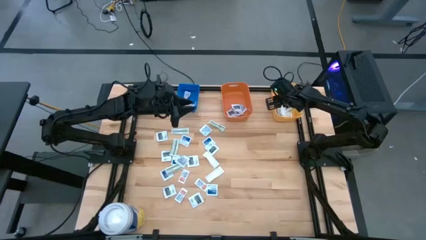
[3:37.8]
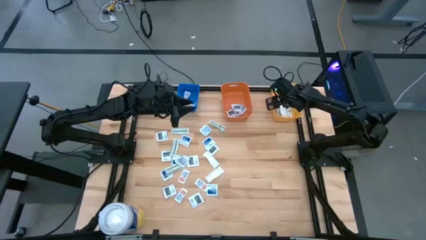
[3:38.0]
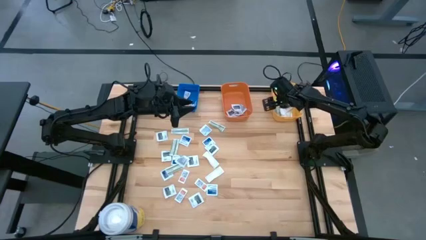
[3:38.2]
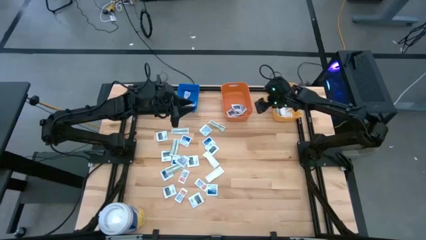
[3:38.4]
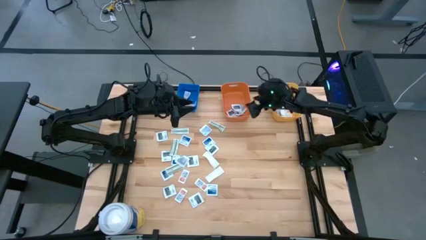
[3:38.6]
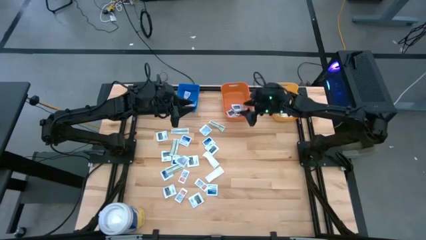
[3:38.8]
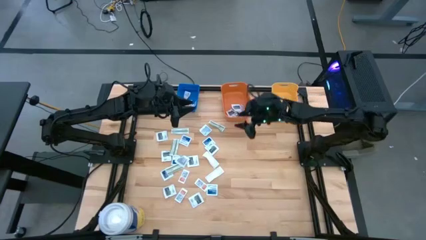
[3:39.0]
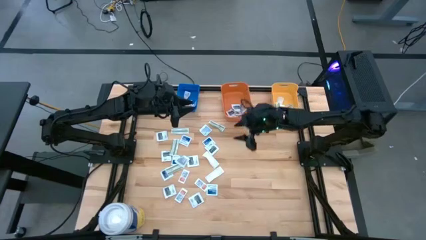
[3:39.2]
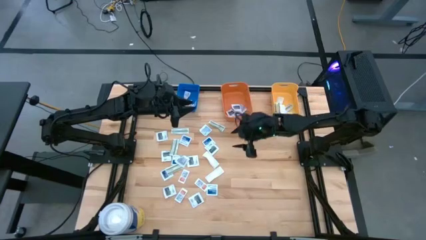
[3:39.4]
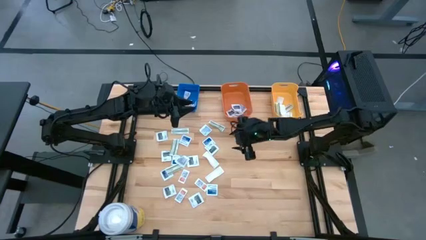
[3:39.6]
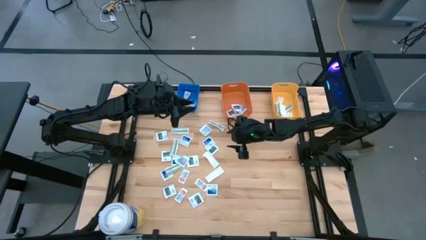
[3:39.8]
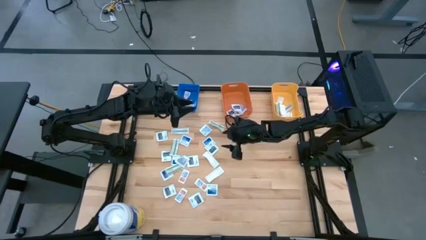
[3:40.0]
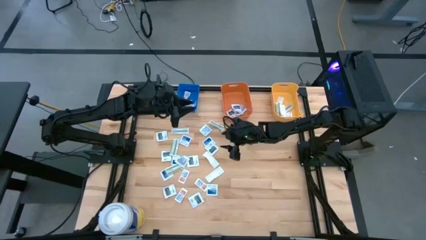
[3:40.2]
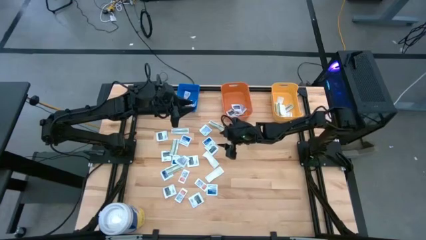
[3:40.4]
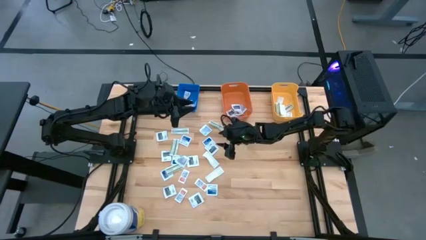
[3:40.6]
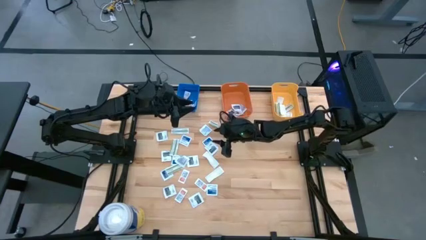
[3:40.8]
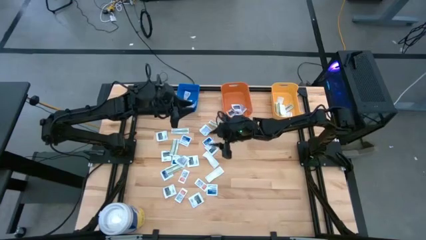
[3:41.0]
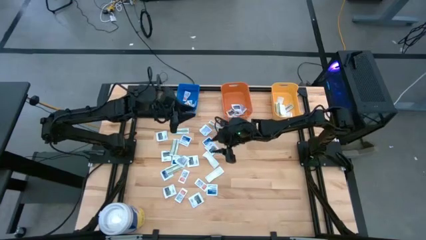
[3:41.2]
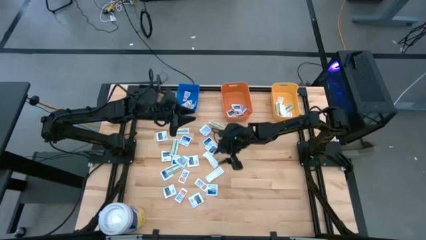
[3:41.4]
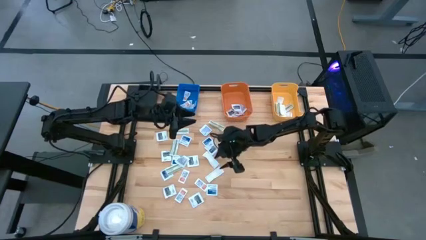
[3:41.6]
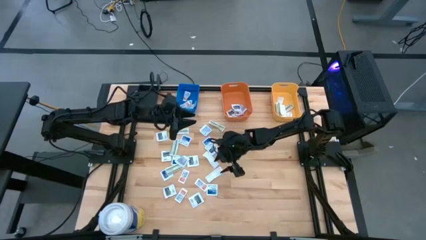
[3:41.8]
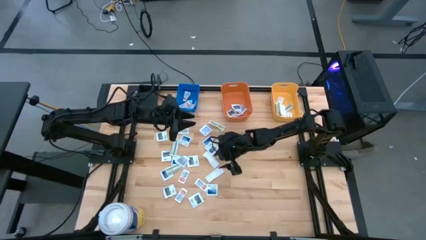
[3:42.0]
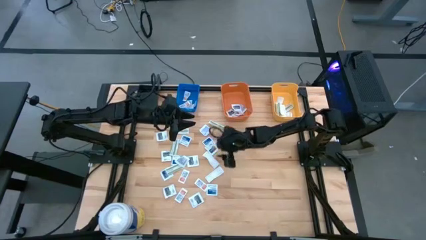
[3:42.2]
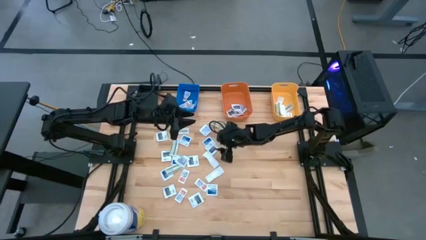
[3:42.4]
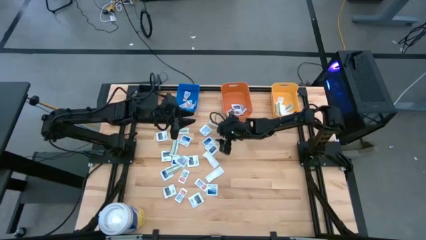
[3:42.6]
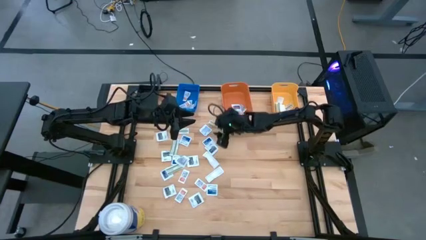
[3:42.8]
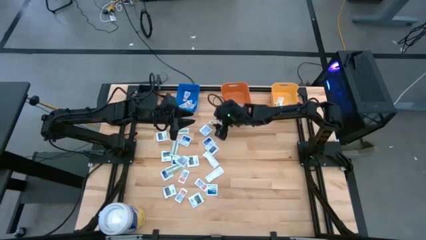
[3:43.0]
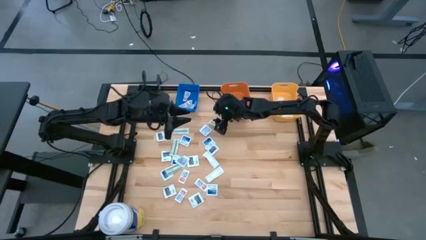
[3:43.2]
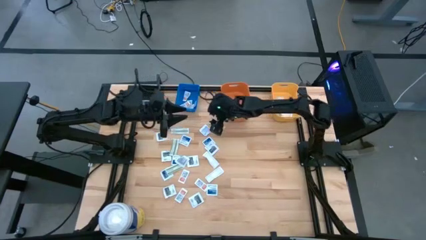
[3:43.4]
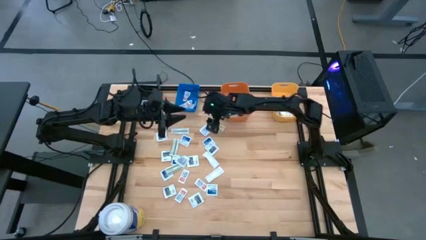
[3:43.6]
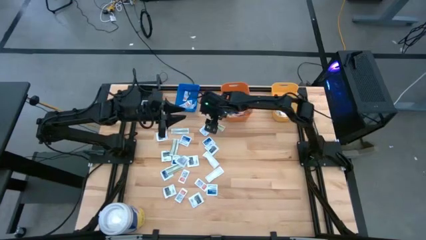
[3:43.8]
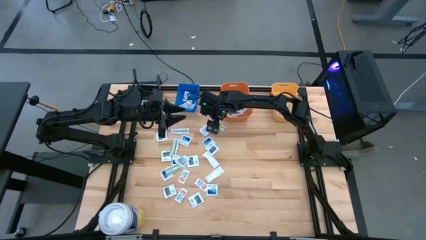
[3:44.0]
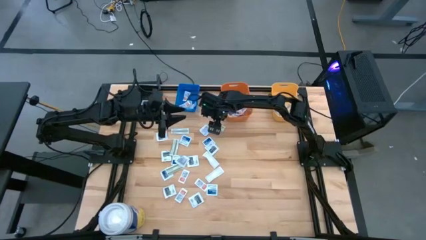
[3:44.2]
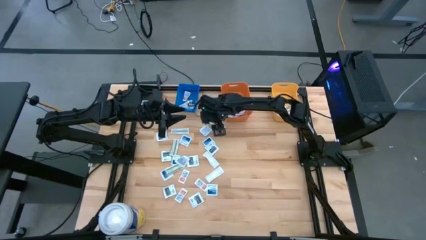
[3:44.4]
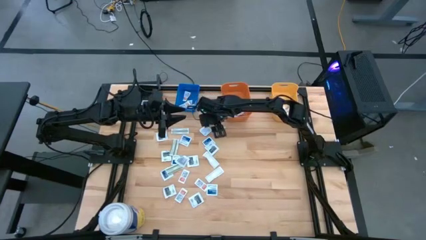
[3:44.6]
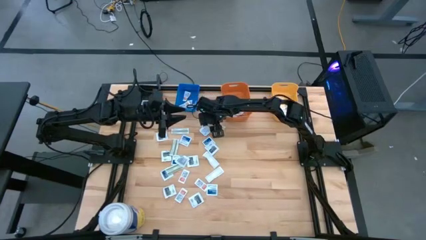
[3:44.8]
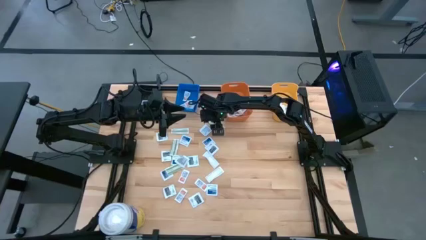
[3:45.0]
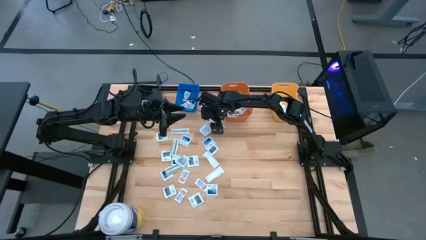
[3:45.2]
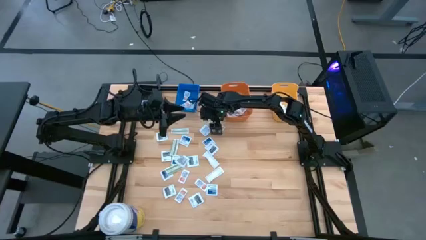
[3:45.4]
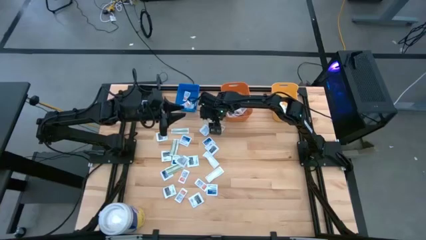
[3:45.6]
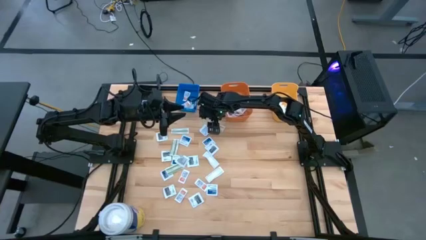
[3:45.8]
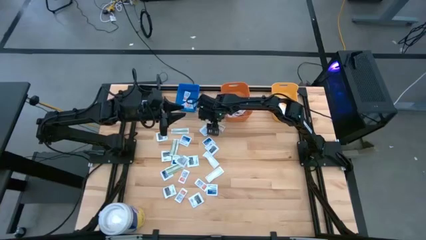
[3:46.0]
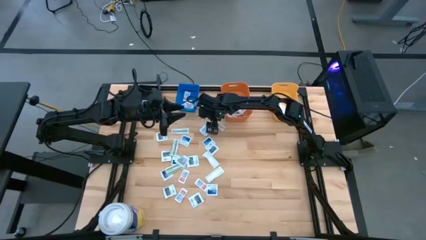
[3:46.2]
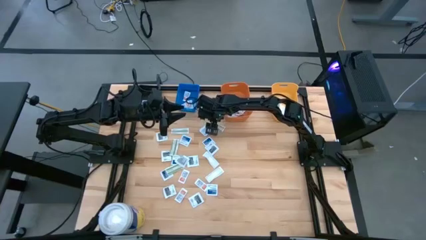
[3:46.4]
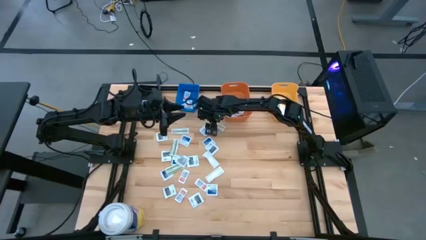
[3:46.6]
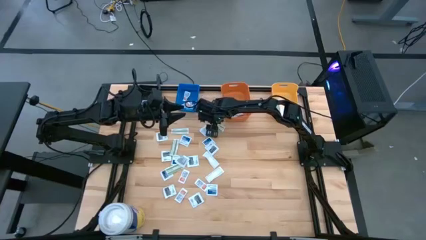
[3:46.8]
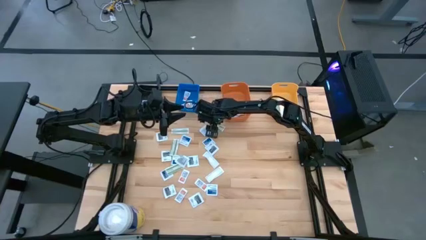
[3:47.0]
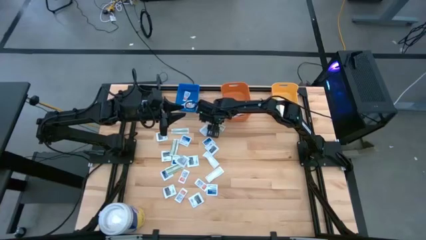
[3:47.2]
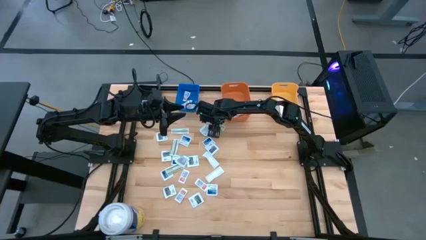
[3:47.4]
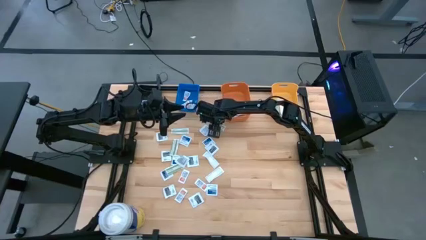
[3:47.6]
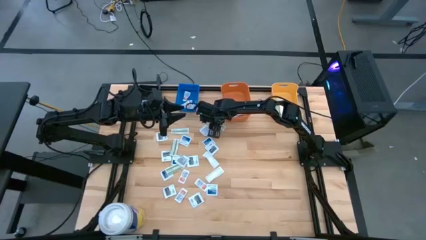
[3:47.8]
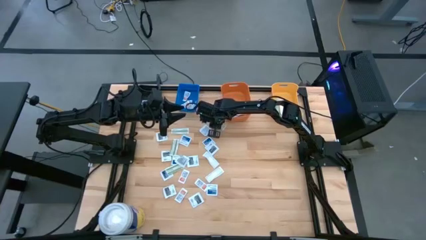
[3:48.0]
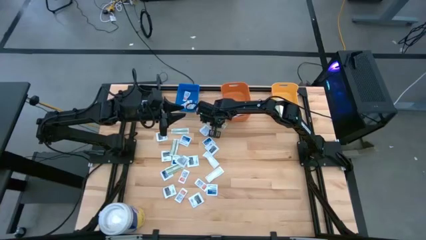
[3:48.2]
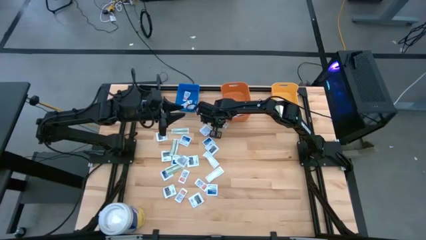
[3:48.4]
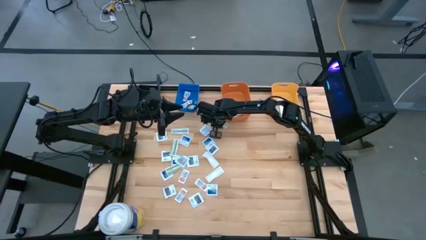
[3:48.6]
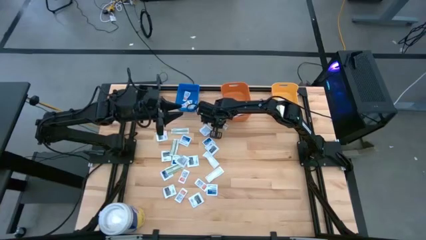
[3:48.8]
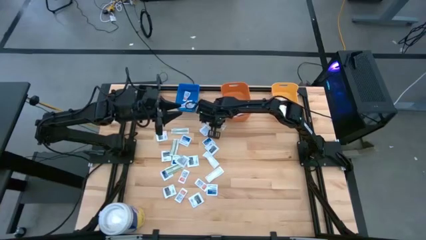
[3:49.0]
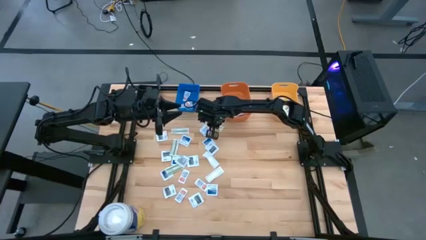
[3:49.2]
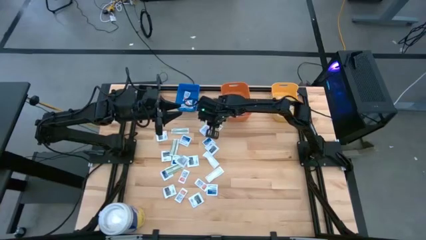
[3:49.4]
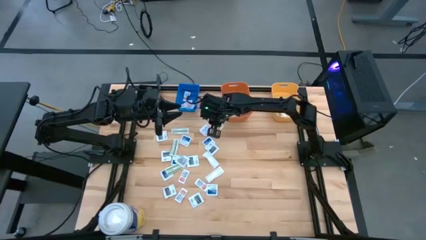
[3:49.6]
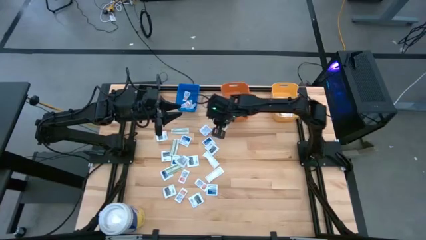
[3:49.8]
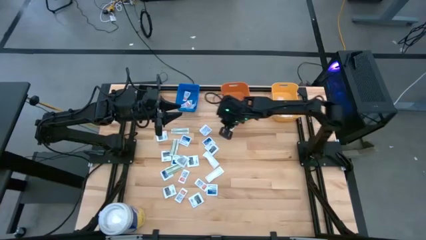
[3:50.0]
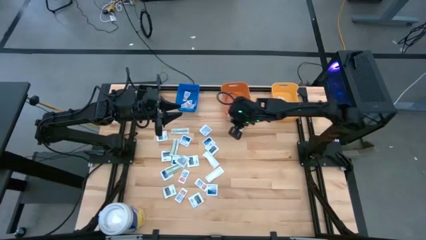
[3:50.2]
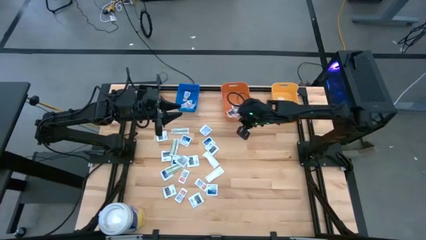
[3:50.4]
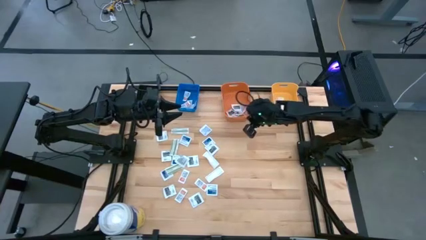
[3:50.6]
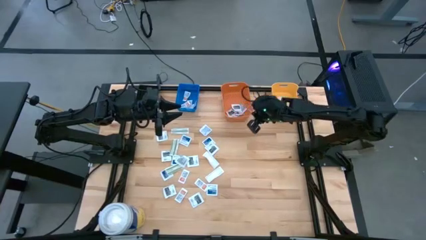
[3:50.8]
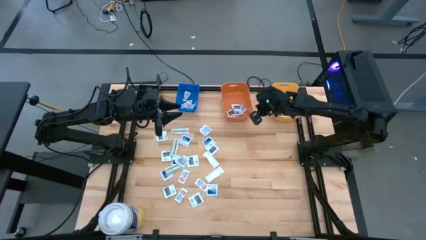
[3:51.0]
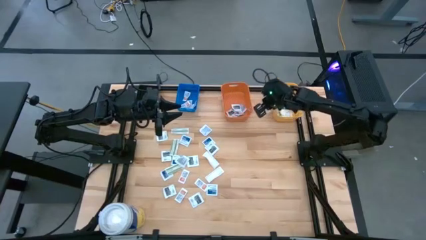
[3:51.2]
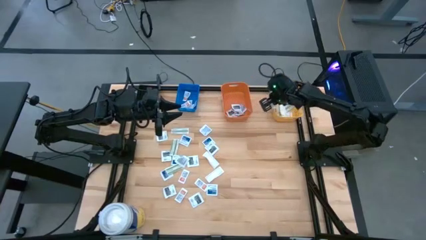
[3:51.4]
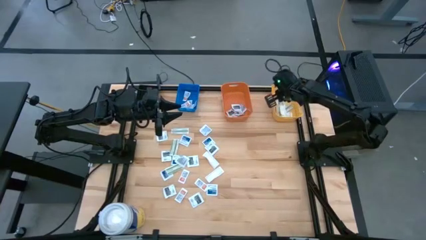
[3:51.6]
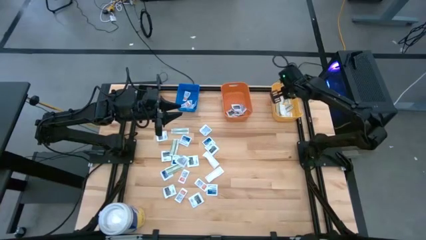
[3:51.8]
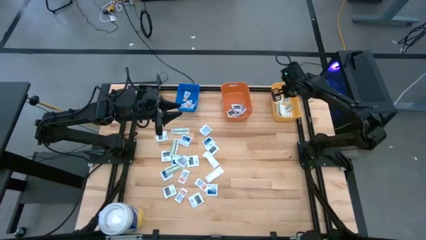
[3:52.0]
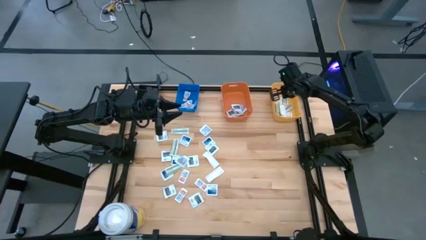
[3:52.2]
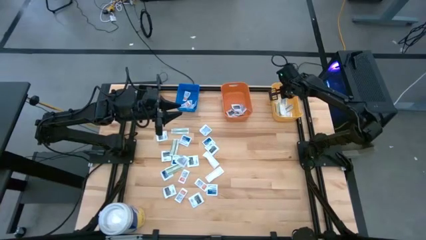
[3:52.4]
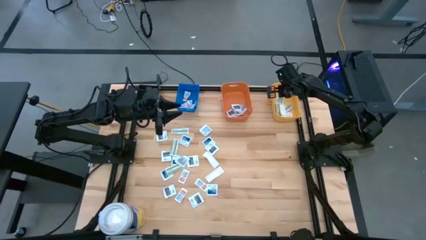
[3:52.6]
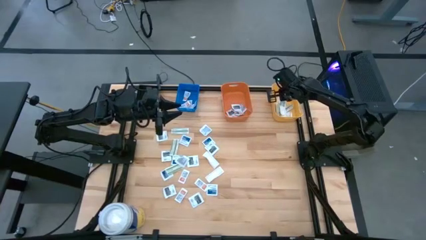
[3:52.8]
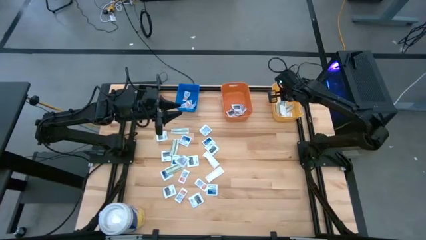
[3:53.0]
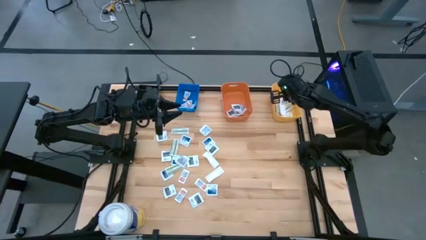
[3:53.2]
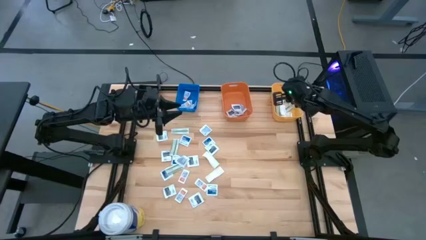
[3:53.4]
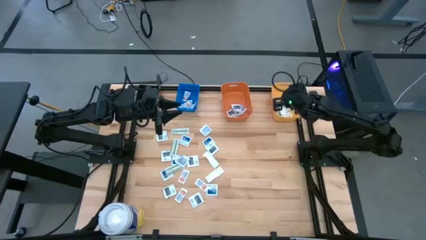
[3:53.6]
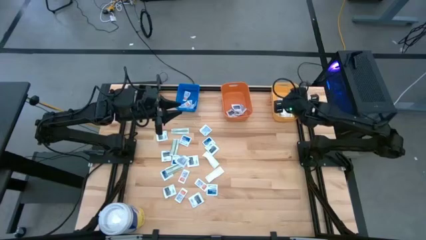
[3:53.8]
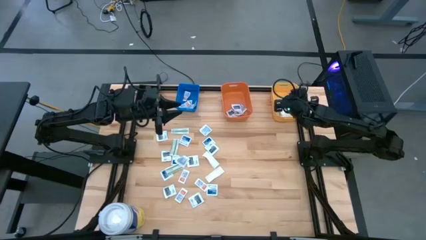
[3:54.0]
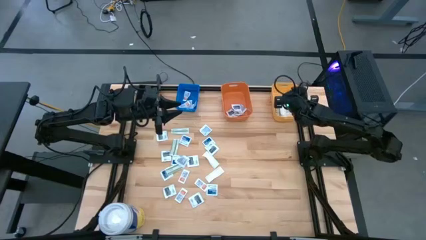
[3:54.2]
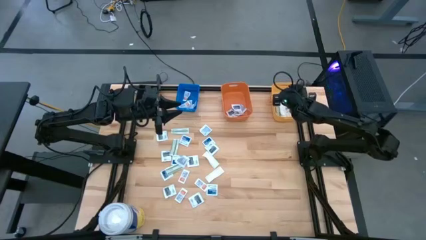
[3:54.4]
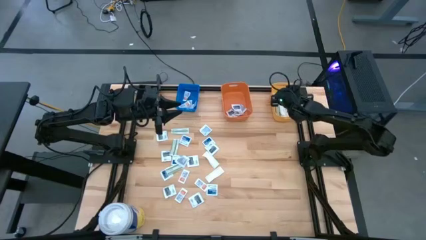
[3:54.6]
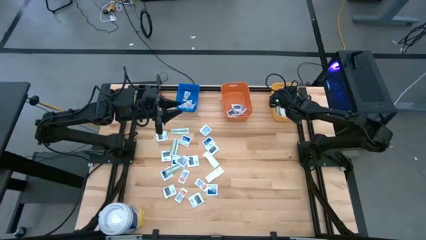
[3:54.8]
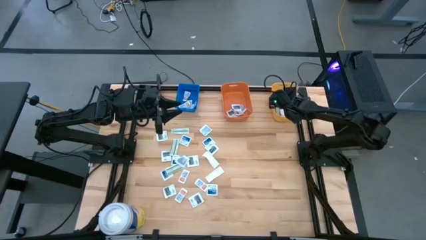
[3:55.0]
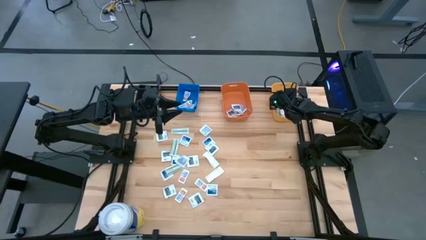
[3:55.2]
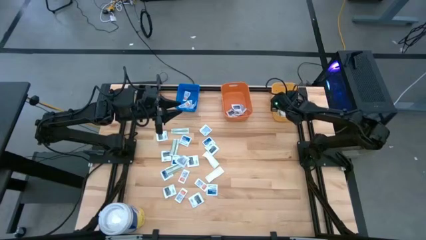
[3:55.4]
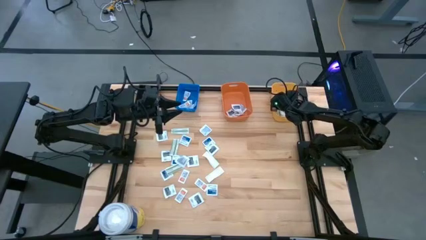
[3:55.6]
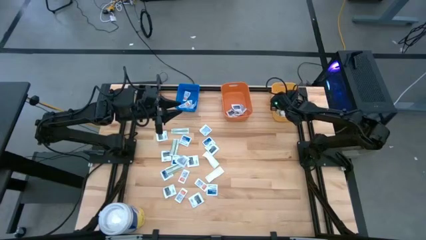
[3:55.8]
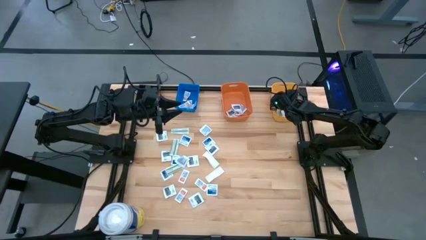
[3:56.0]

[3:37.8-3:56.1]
Task: Pick & Place First Aid Supplies
Put the bandage into the yellow bin
